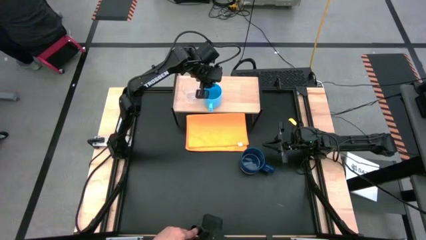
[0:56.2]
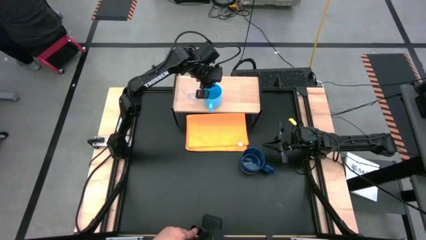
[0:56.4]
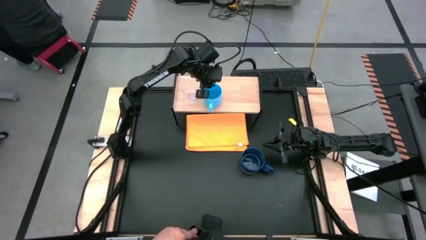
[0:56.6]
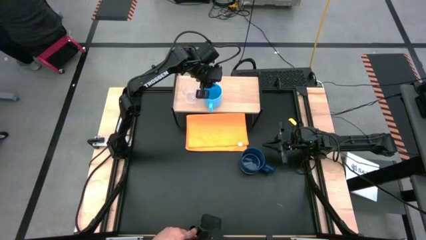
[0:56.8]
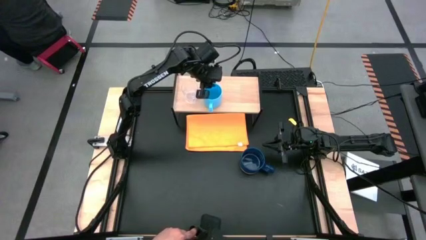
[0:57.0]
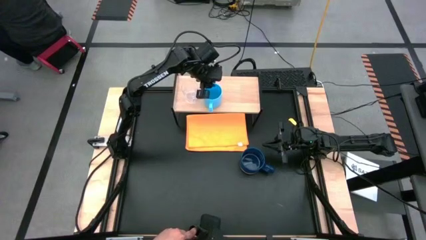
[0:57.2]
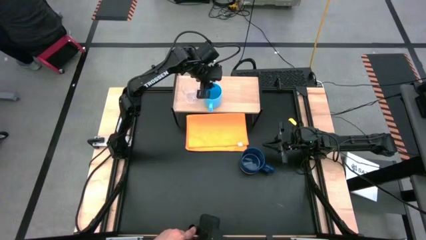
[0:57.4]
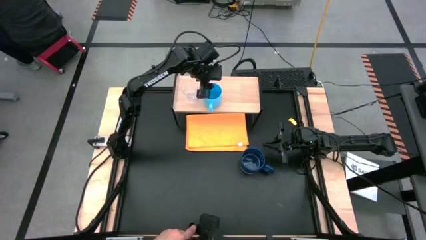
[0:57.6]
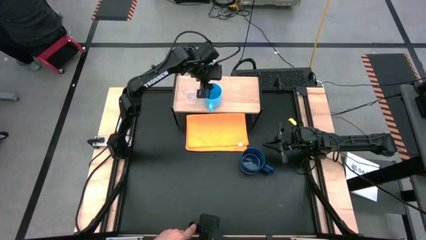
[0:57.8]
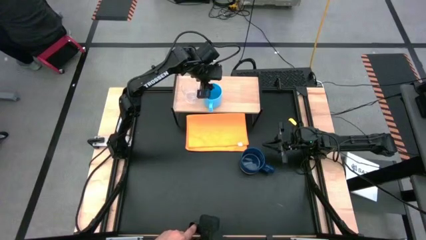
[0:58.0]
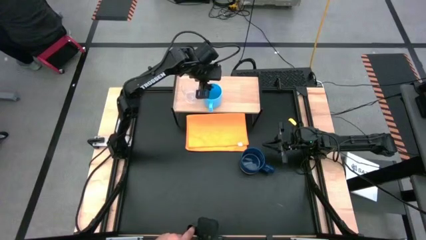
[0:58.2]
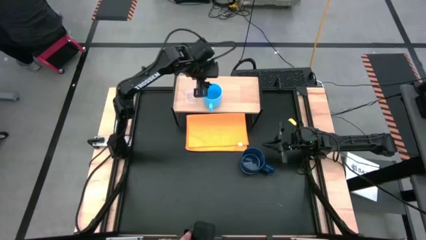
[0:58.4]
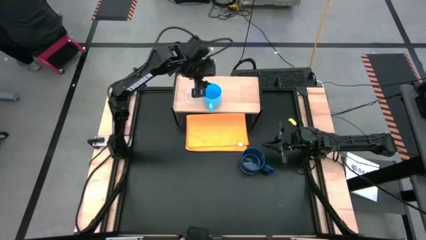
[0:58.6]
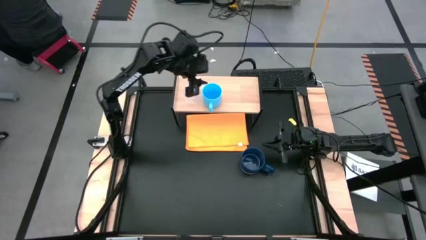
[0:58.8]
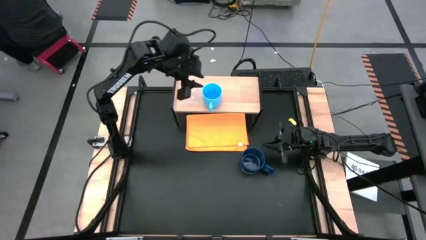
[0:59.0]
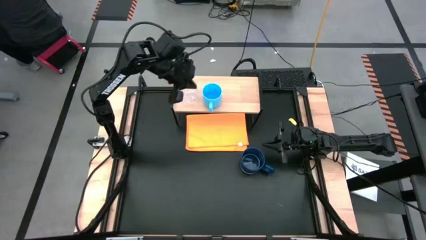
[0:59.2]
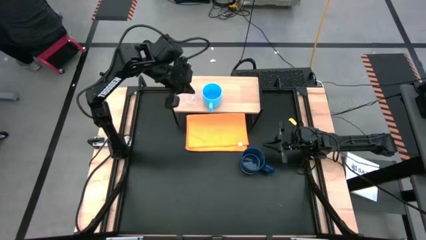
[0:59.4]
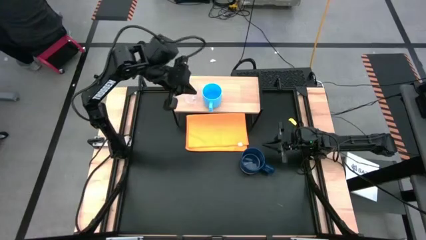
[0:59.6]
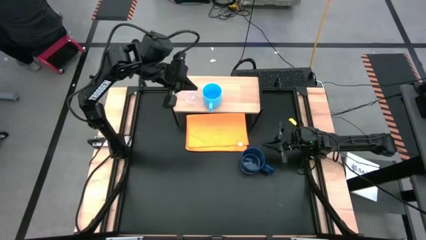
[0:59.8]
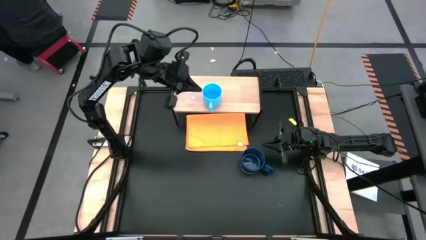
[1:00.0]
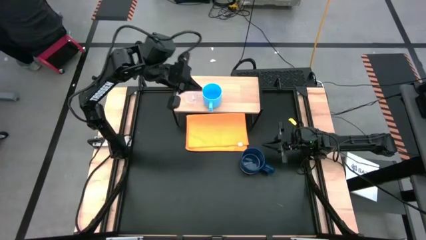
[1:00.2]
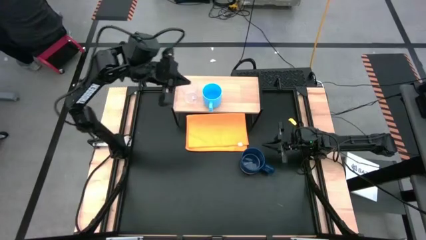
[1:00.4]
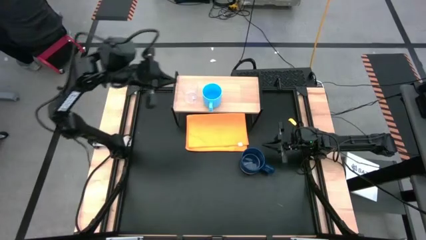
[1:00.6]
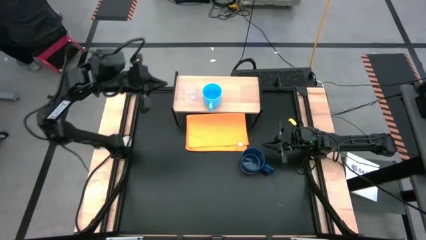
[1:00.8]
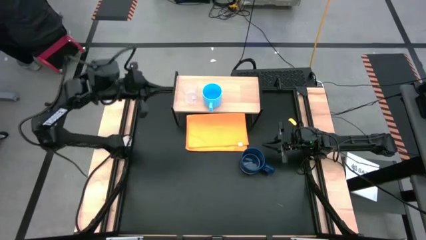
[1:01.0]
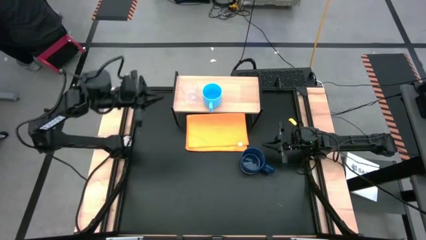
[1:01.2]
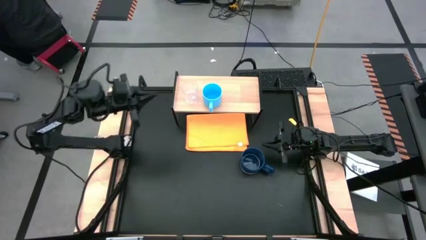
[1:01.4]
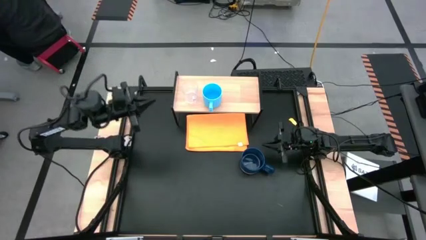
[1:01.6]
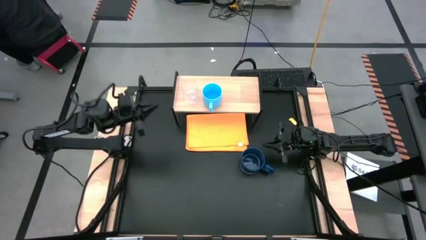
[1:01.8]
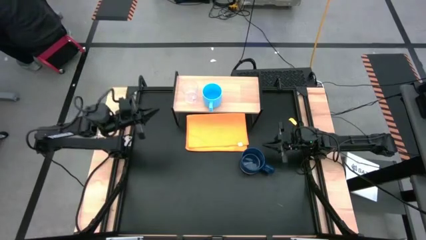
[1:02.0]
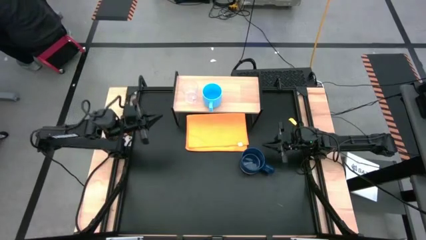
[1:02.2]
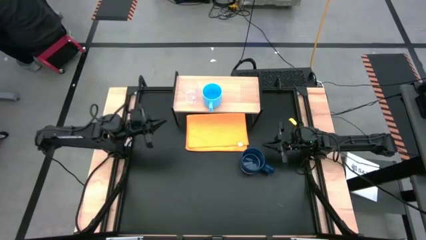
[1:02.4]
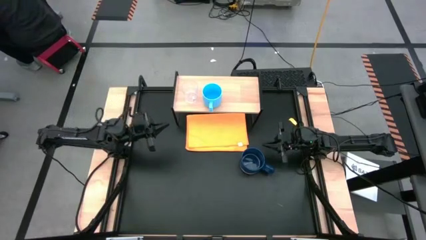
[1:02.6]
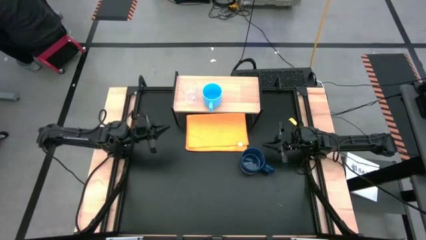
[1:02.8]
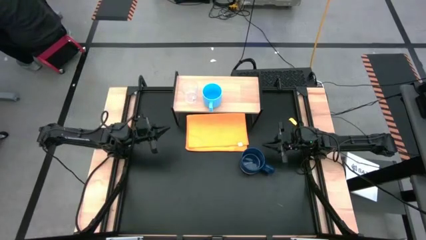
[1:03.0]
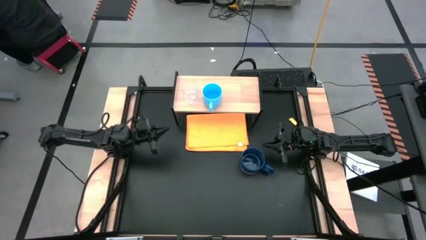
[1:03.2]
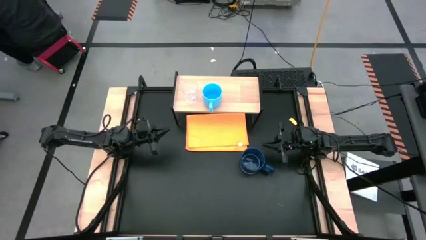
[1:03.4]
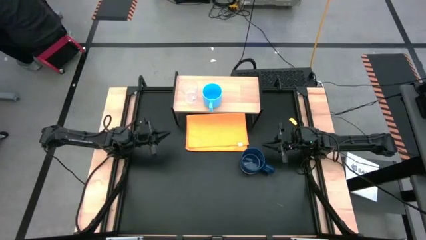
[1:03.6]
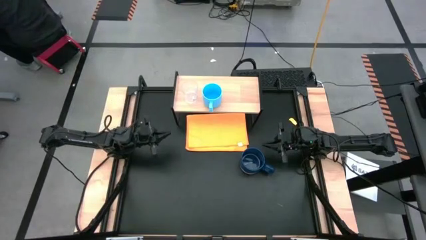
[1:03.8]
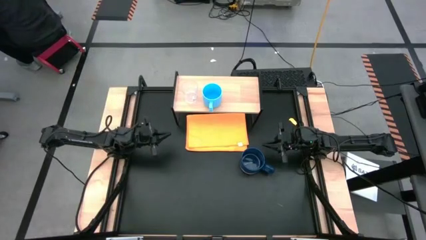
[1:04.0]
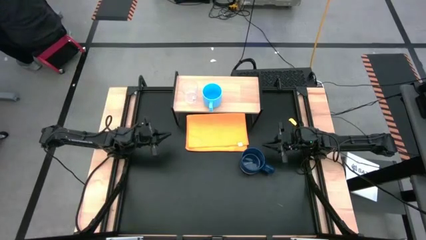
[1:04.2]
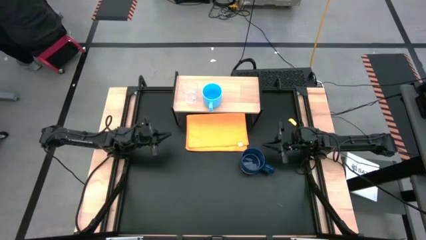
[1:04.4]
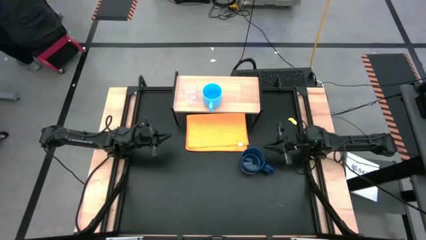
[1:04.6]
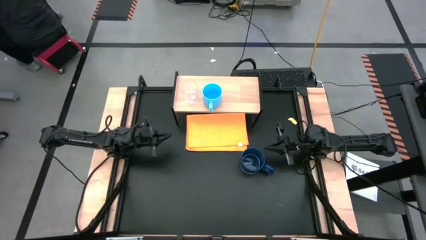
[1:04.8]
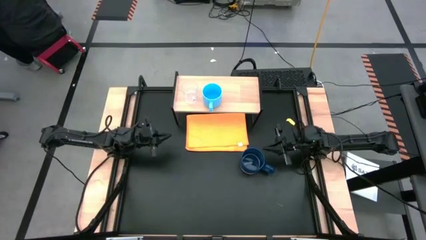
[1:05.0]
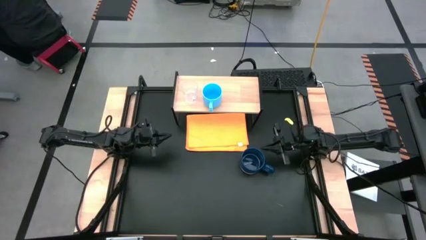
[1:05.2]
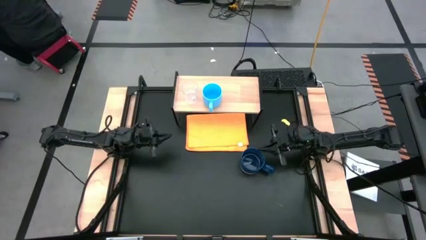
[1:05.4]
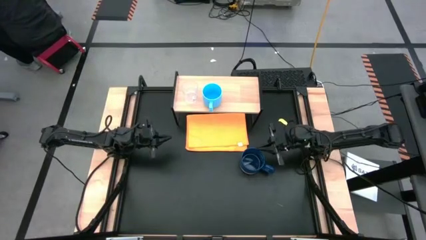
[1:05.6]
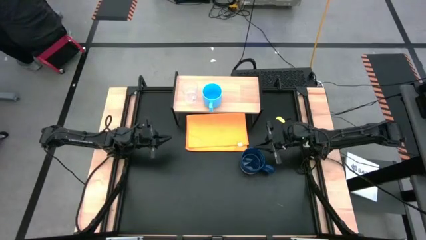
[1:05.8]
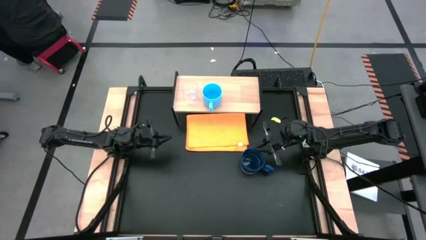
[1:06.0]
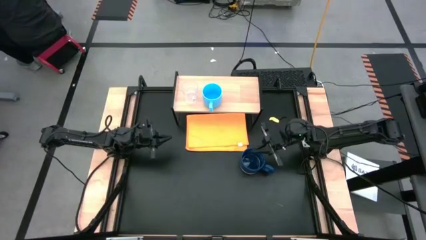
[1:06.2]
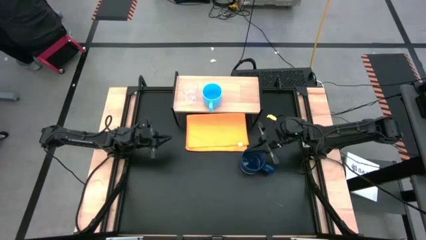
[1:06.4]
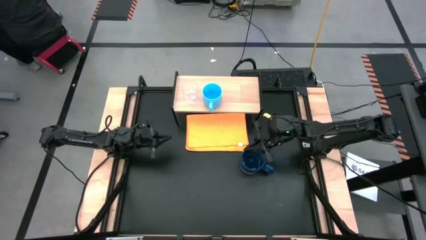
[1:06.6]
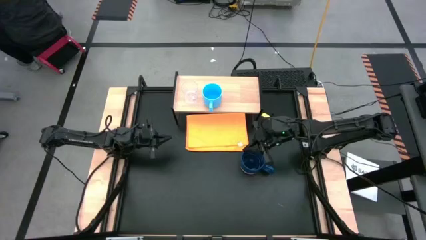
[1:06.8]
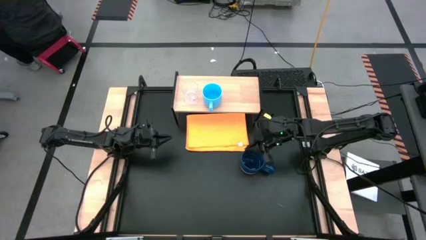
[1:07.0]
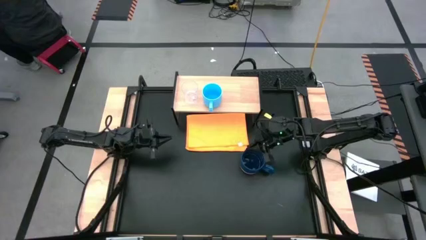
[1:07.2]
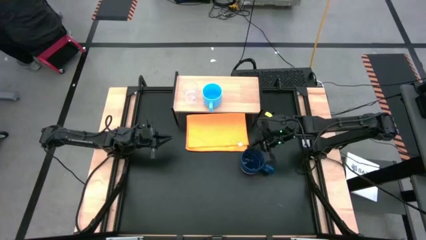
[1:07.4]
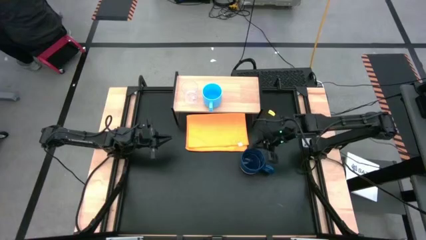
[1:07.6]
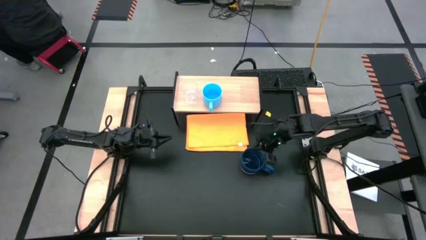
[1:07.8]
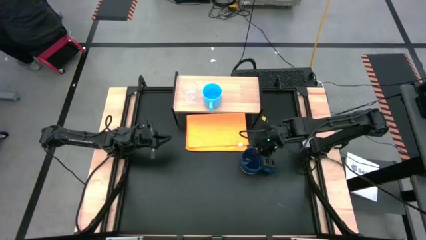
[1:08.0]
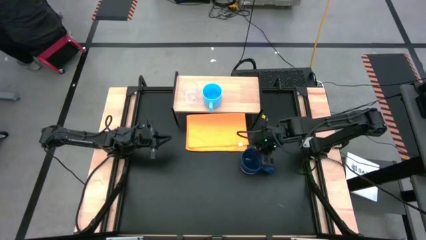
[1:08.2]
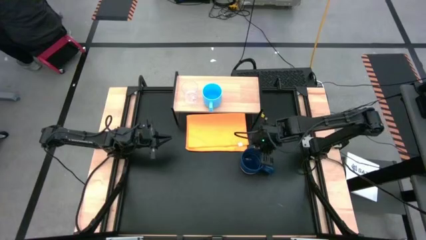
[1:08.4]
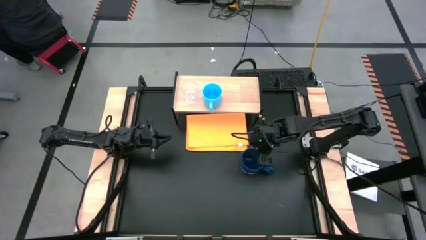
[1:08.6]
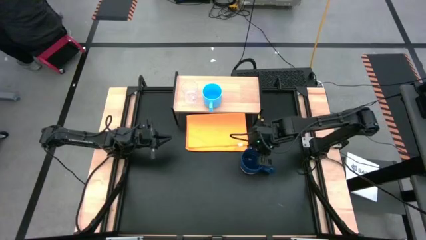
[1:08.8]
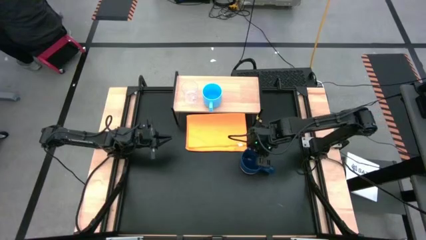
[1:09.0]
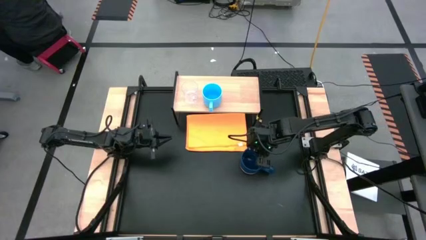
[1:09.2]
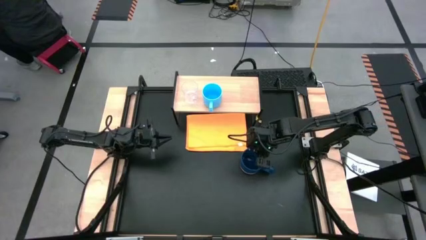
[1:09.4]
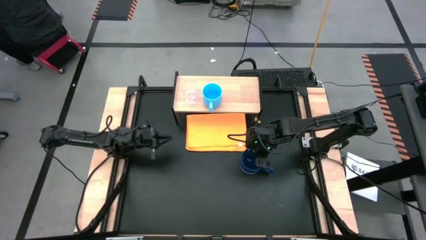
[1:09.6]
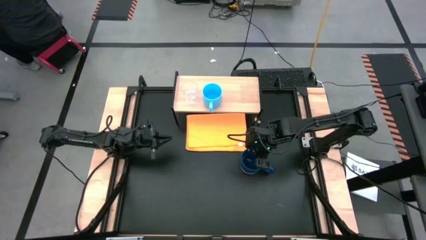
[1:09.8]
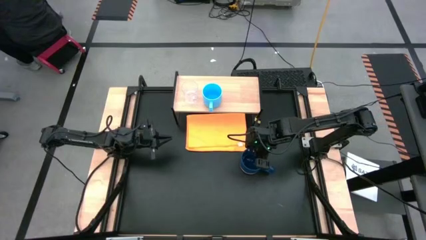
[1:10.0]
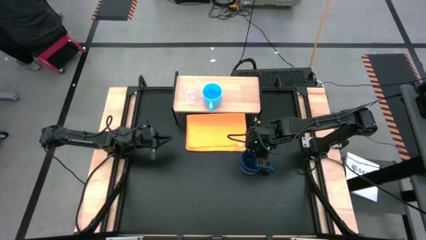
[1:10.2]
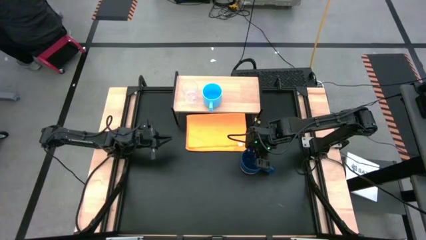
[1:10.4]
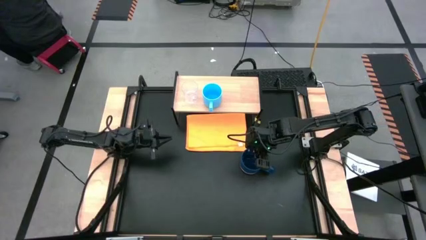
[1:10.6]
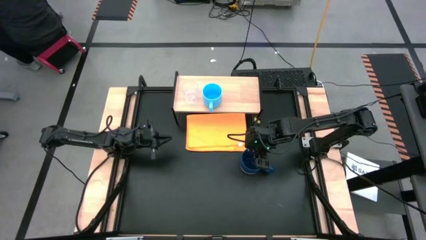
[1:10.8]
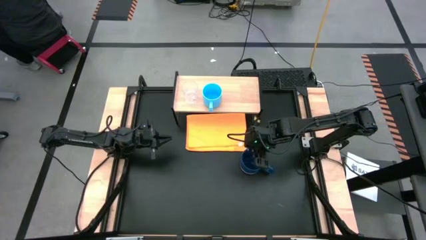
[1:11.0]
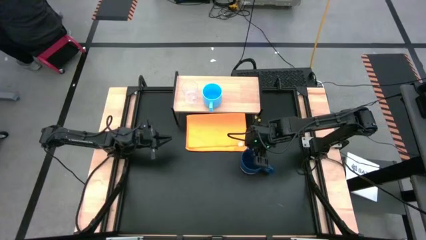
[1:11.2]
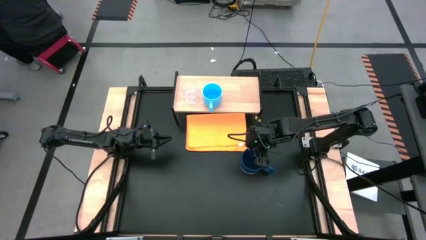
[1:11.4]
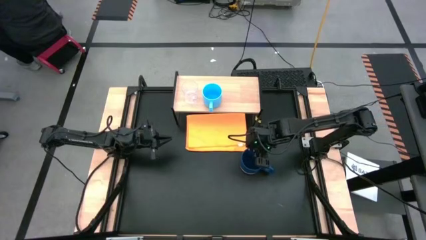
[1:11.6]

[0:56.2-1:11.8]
Task: Stack small to large cups/mugs on shelf
Put the dark blue mug on the shelf
